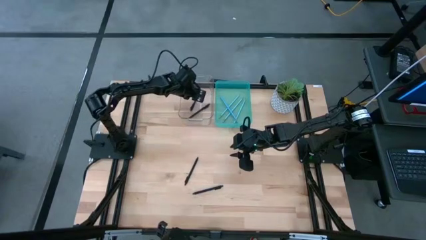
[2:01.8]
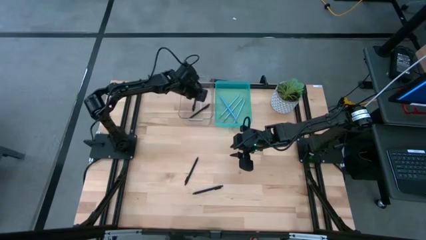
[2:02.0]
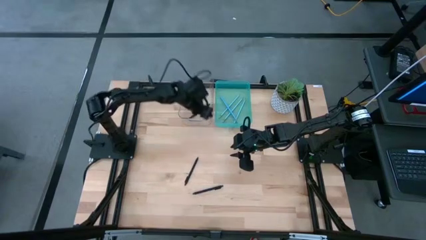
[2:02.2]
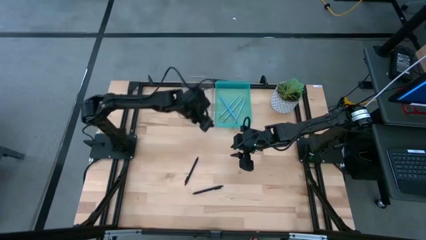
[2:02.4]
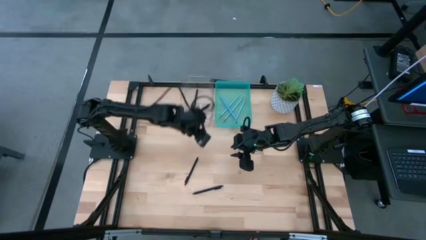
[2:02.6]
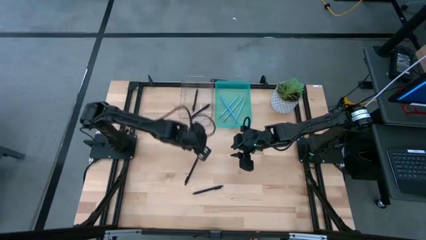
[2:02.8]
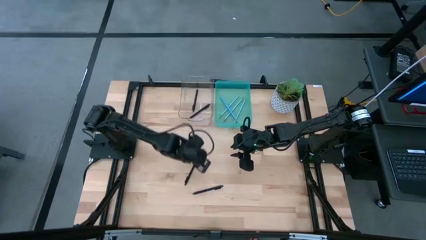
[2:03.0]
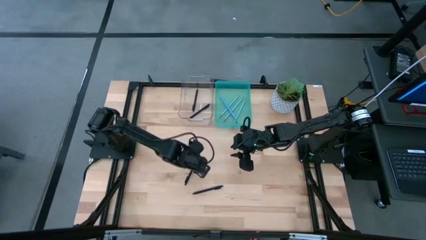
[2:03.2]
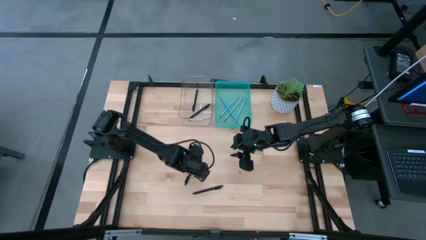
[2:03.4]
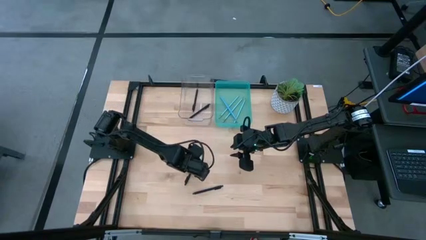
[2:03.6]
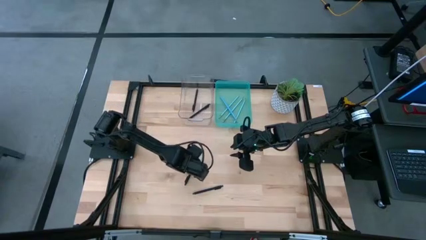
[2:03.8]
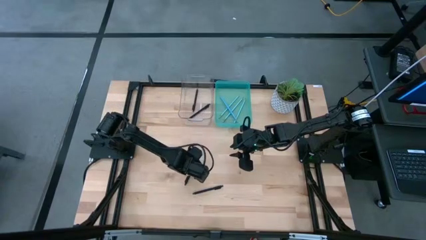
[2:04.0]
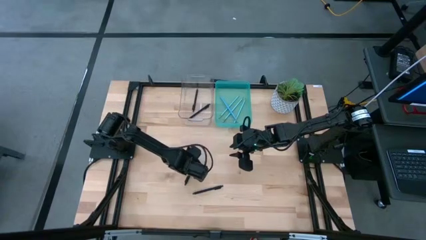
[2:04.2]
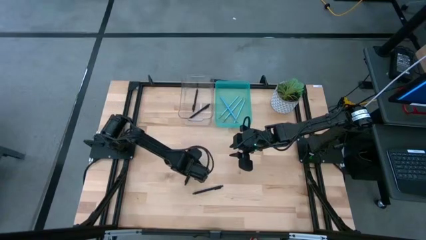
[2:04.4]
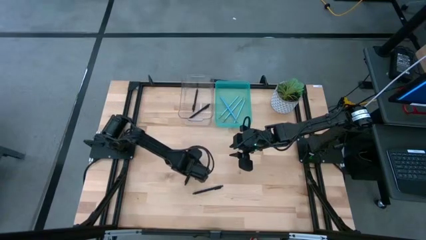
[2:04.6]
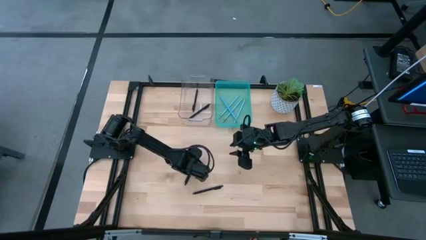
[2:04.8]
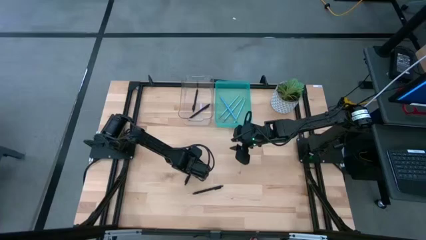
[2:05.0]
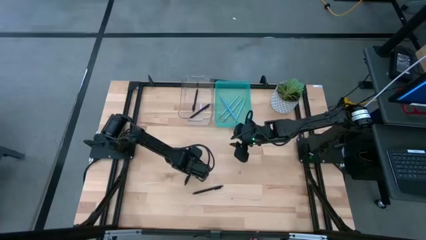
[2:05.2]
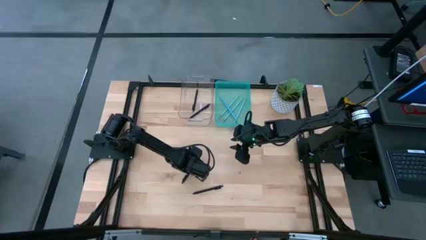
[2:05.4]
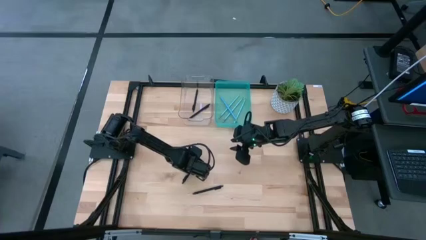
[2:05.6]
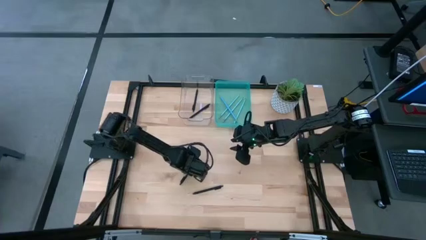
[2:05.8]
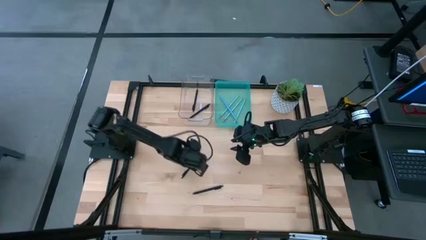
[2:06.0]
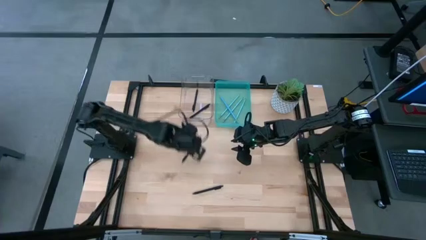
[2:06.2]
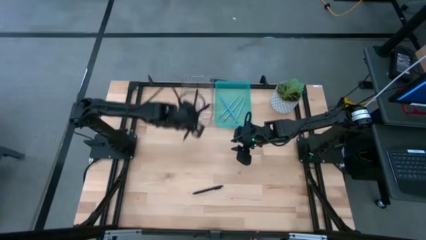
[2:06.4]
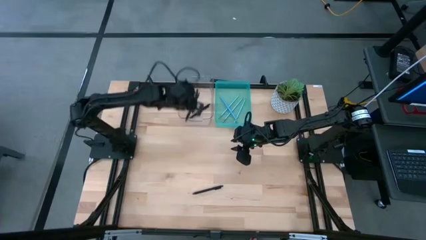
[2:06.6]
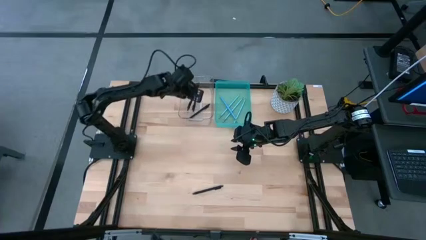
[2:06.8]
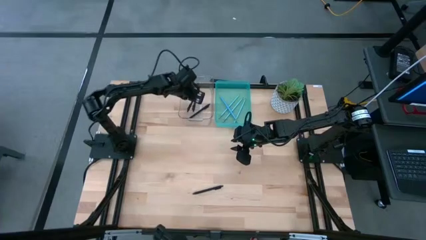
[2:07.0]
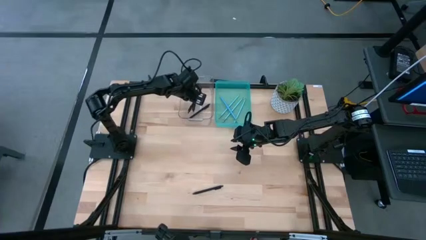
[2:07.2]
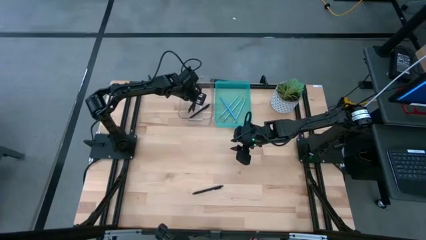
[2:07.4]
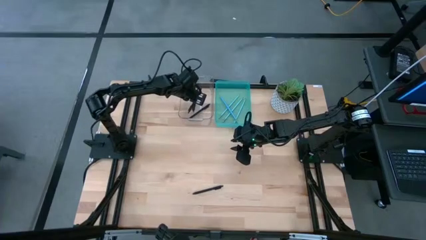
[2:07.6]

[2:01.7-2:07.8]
Task: Sort pens & pencils
Put the black pen into the transparent bin

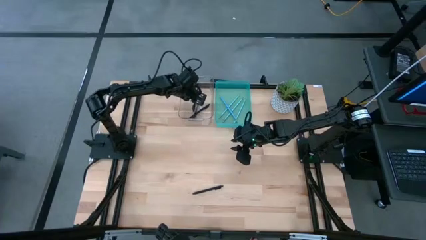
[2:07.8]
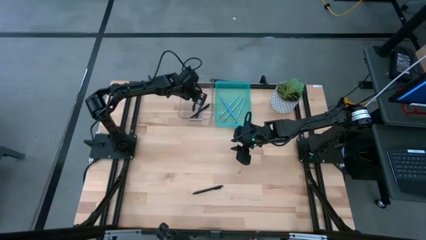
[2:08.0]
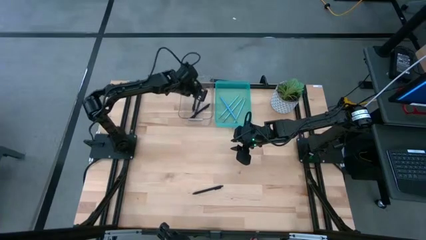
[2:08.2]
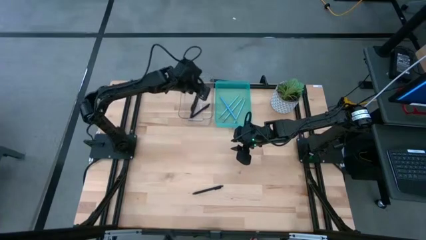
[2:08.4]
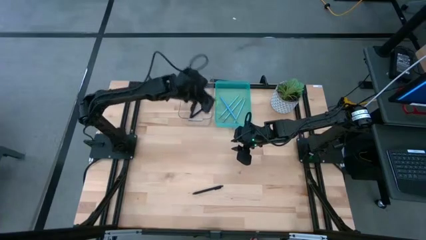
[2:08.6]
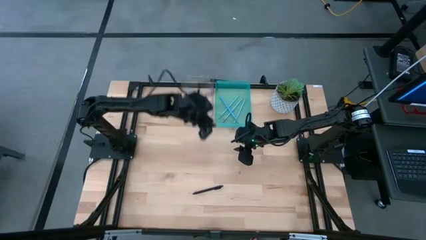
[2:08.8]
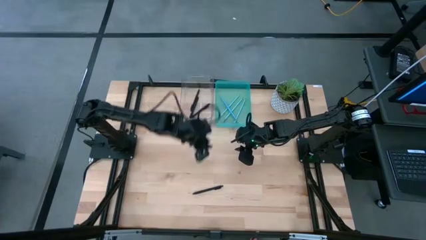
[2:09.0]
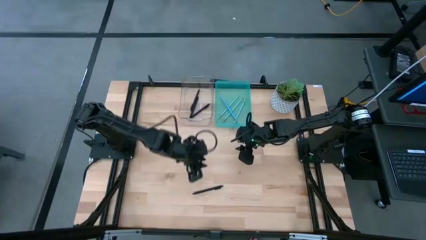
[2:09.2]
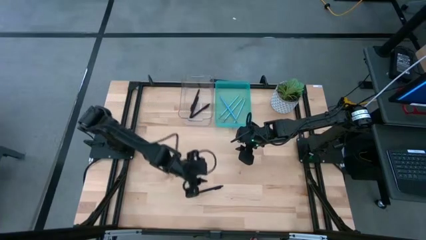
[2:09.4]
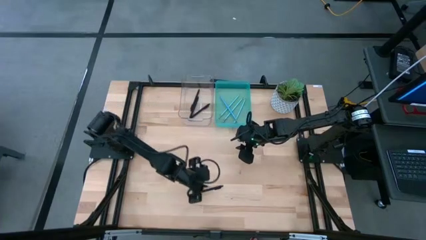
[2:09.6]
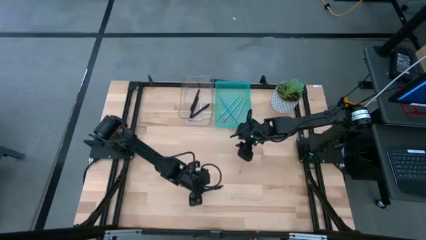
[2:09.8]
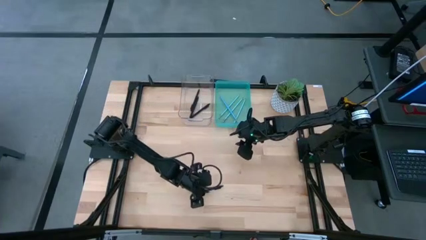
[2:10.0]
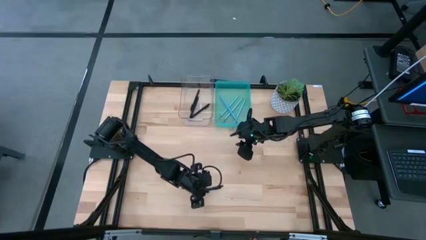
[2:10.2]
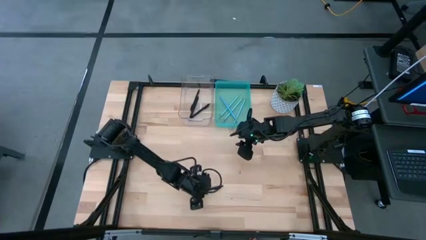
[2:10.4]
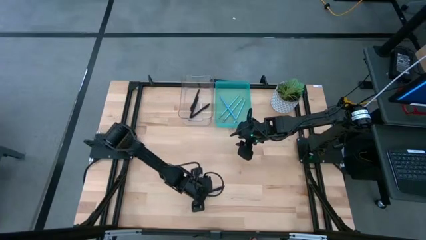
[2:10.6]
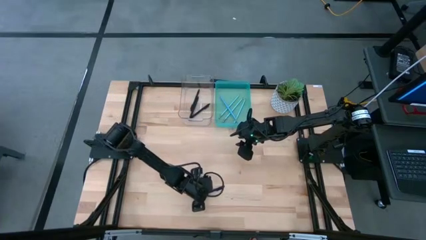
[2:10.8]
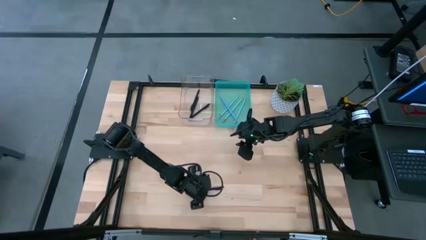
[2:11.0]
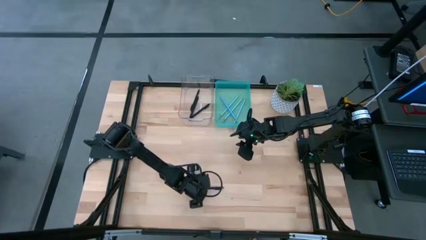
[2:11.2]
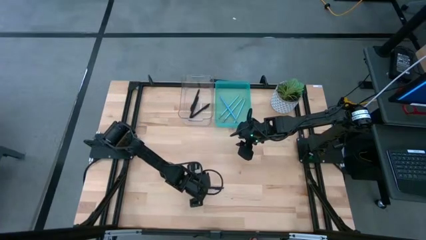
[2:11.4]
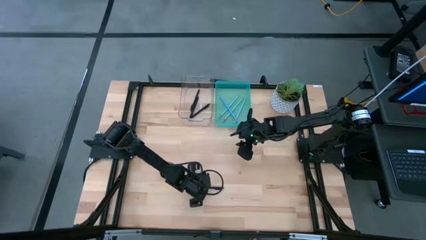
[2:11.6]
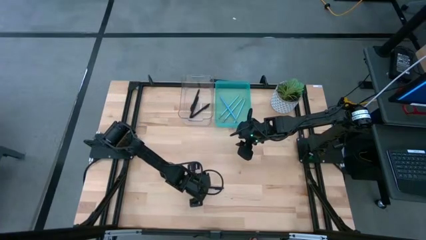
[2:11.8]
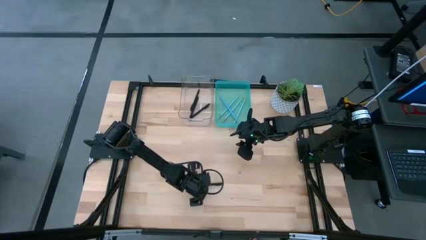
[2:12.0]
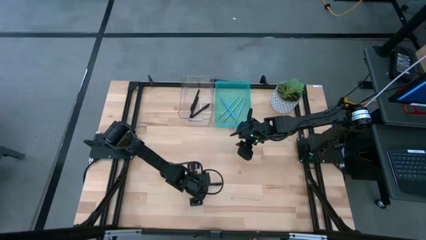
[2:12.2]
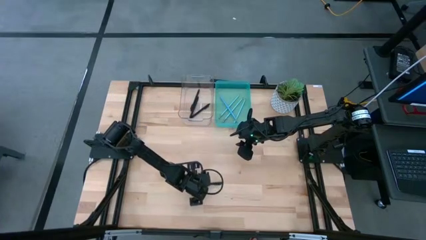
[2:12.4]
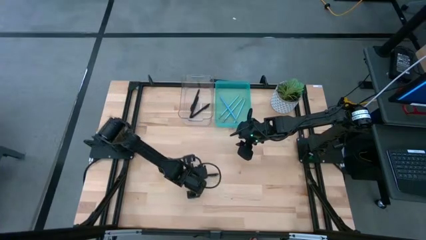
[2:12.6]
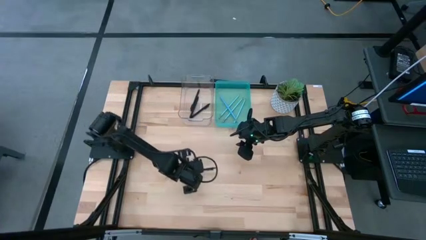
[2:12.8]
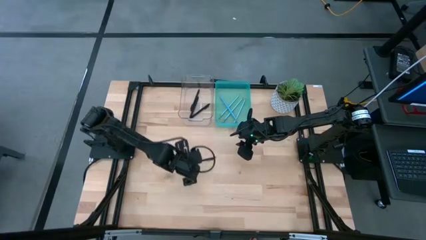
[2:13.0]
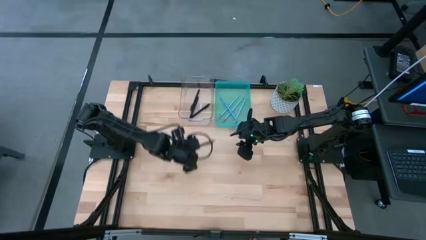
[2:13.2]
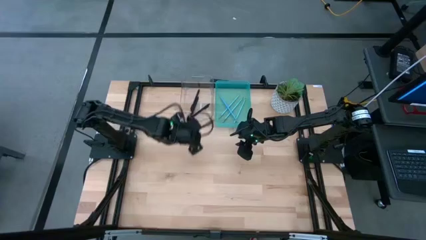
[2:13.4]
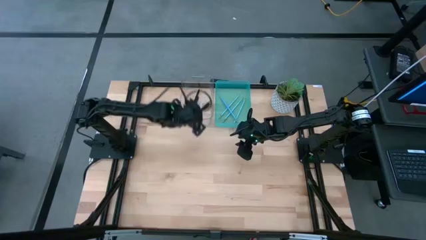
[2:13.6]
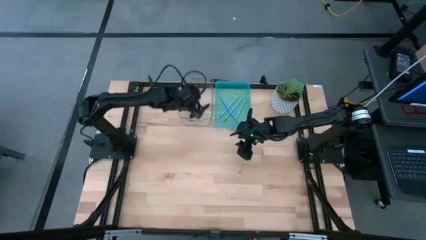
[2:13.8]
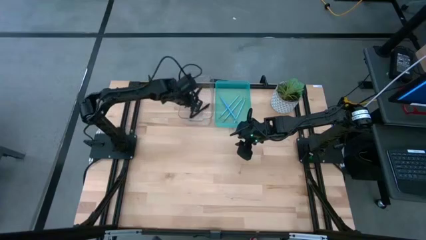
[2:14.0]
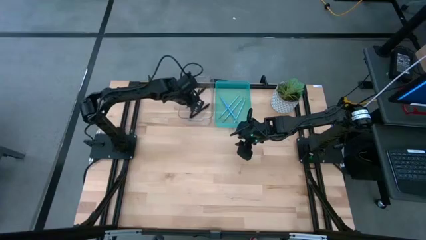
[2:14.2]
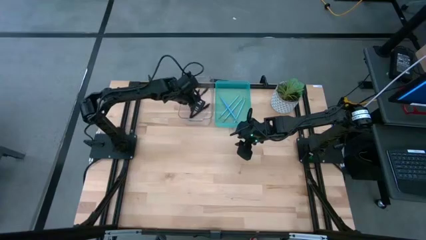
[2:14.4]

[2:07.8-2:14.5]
Put the black pen into the transparent bin

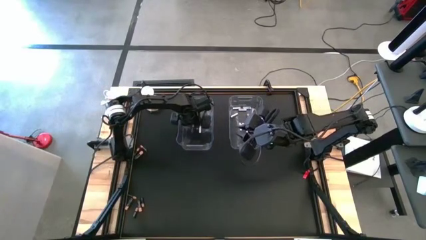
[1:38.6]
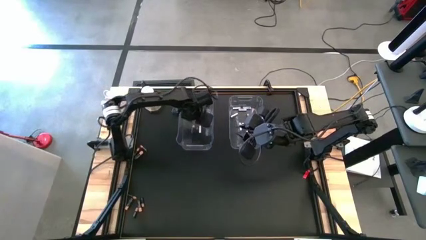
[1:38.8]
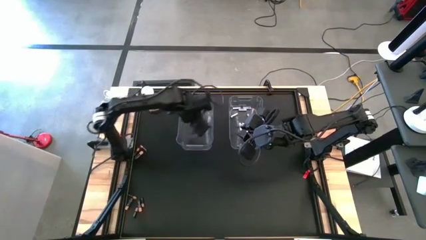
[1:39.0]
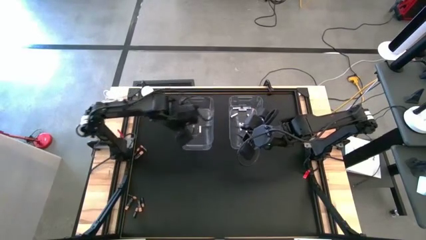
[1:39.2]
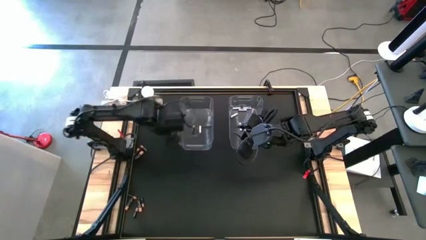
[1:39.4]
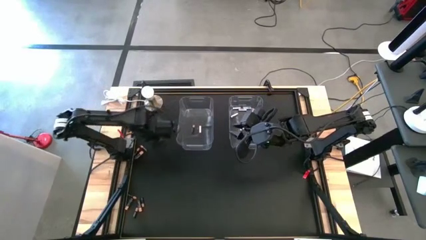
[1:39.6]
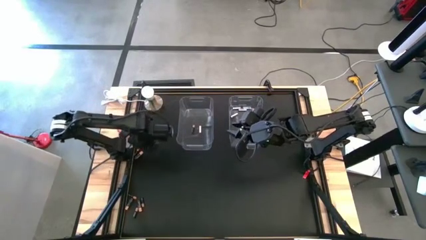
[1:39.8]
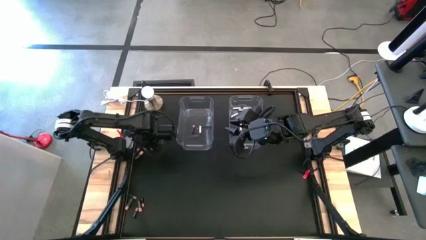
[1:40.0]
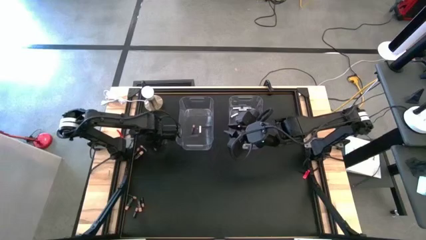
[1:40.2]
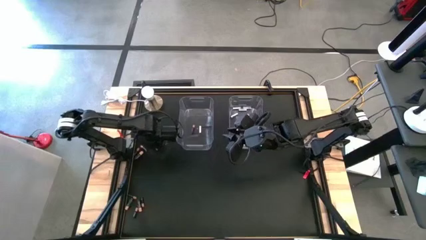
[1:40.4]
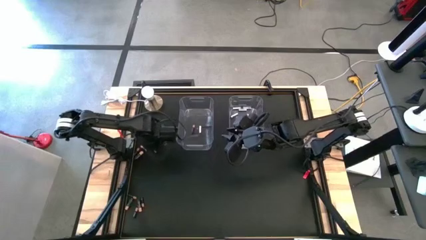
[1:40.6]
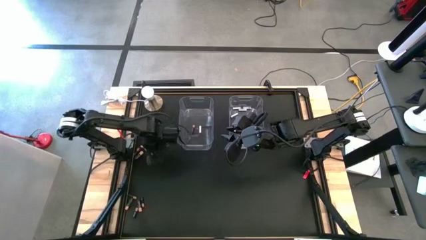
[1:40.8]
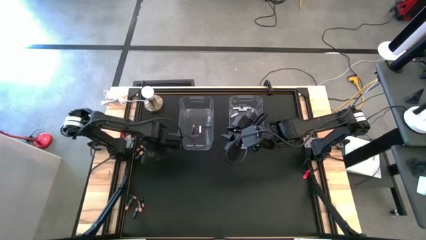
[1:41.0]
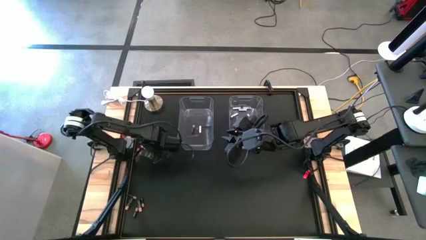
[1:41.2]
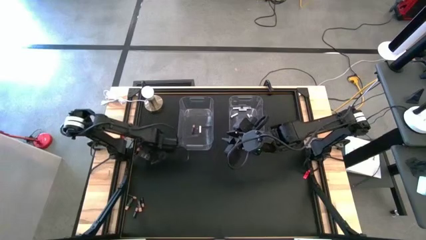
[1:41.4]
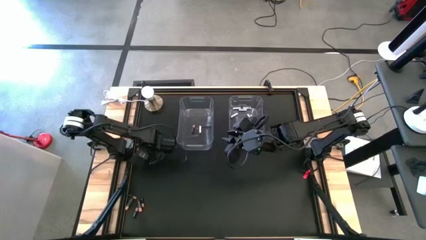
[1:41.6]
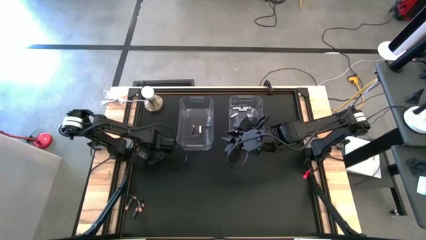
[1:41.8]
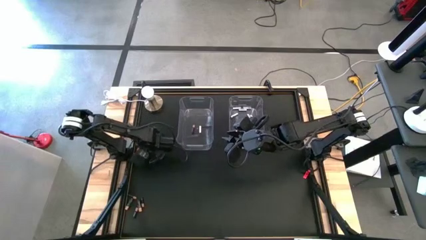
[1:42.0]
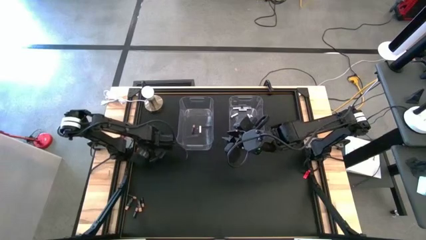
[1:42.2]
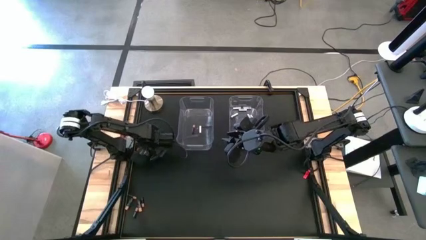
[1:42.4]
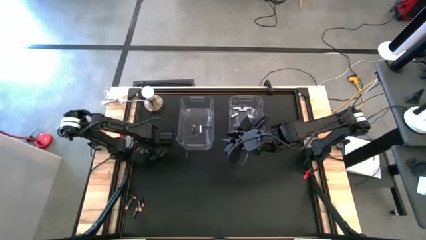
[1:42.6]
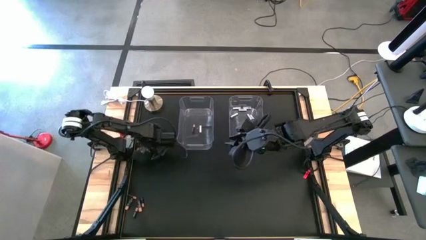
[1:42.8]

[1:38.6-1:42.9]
Task: Sort batteries
Put the black battery into the left transparent bin
